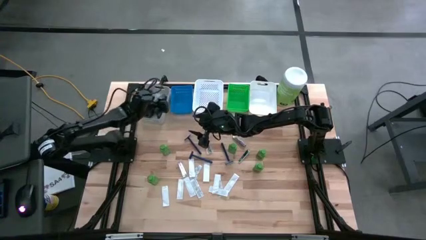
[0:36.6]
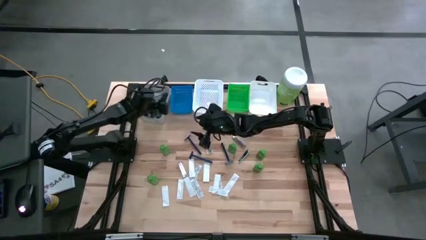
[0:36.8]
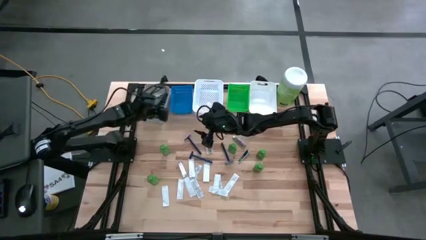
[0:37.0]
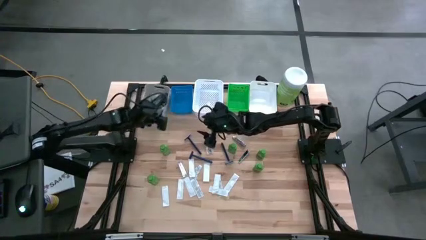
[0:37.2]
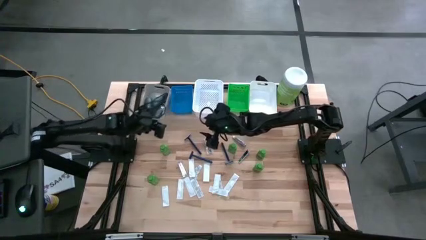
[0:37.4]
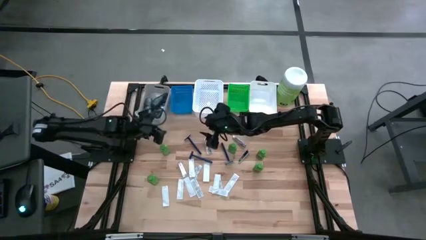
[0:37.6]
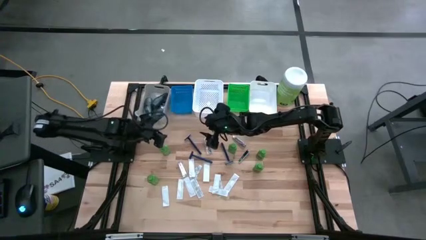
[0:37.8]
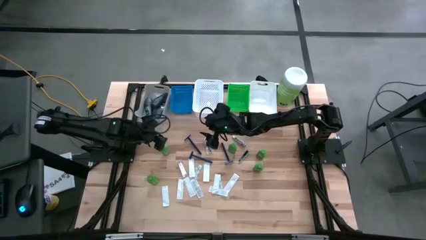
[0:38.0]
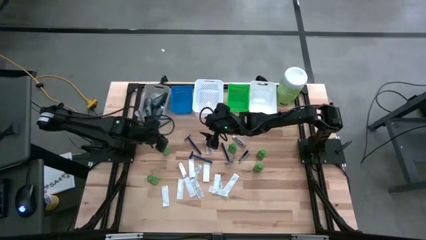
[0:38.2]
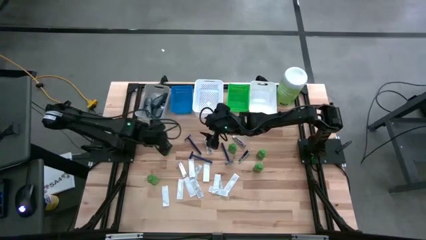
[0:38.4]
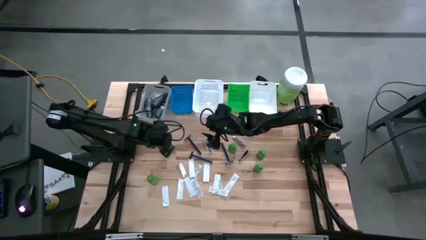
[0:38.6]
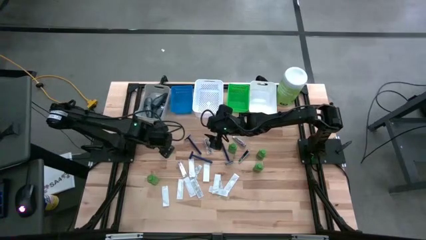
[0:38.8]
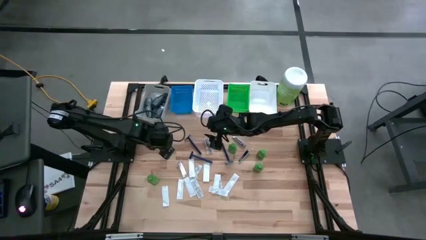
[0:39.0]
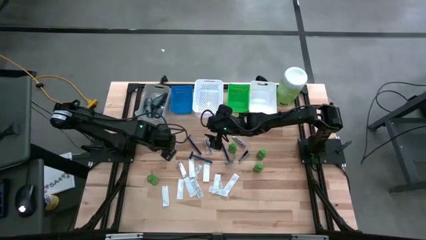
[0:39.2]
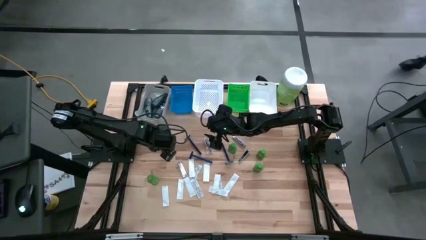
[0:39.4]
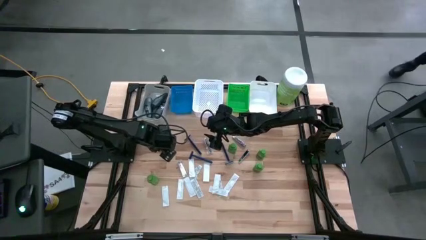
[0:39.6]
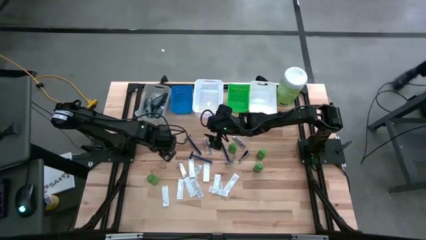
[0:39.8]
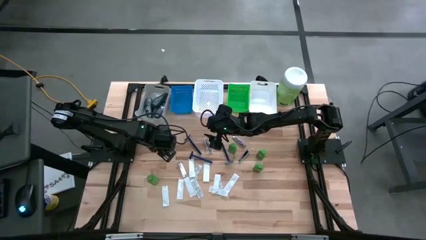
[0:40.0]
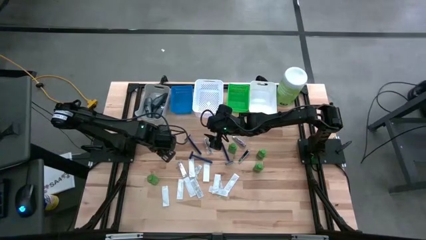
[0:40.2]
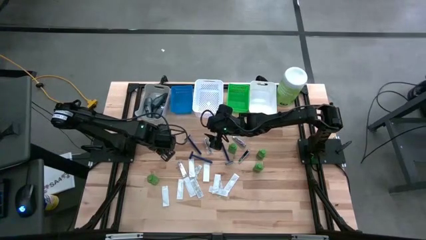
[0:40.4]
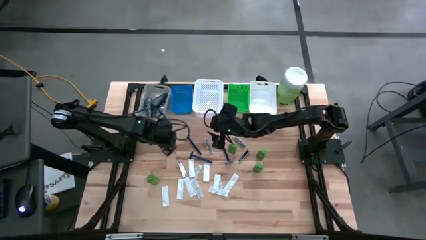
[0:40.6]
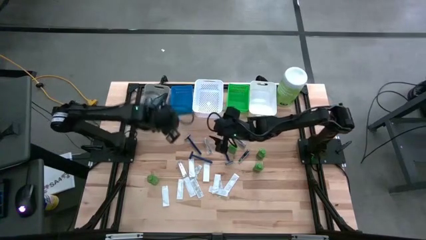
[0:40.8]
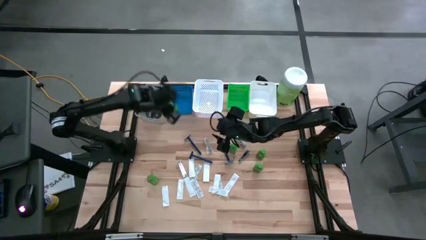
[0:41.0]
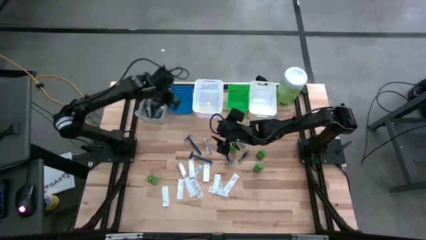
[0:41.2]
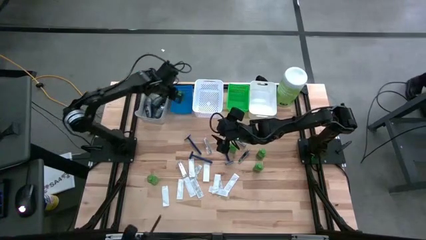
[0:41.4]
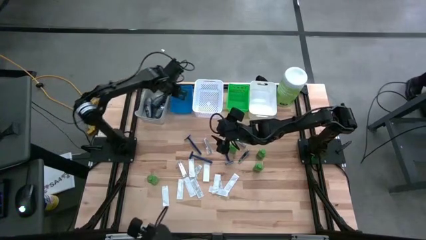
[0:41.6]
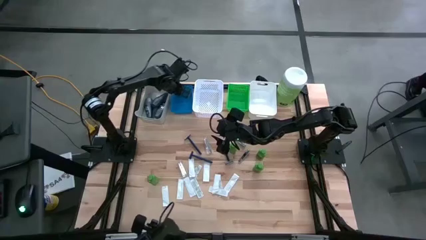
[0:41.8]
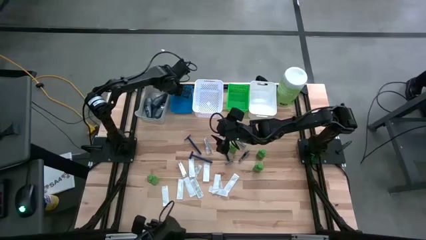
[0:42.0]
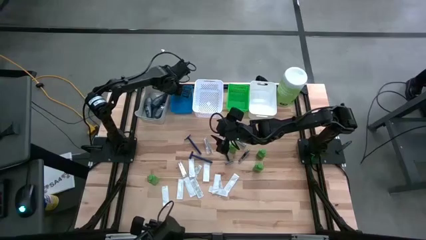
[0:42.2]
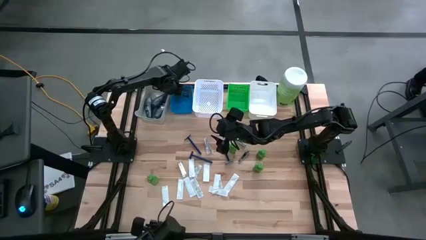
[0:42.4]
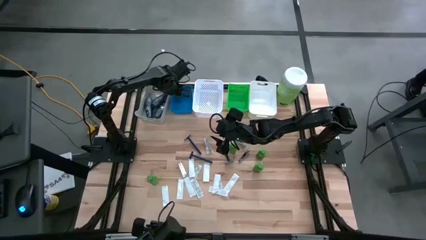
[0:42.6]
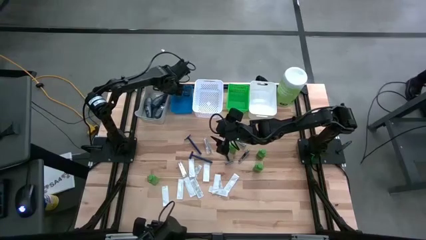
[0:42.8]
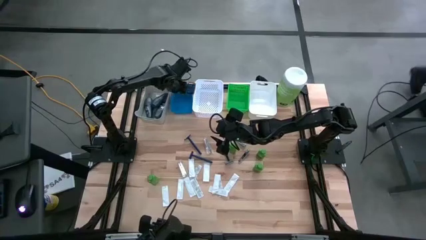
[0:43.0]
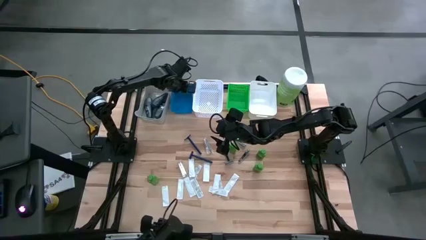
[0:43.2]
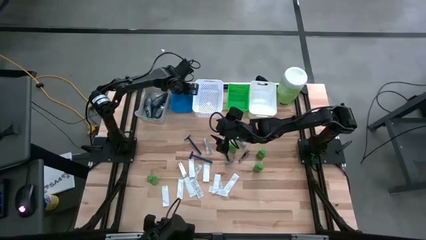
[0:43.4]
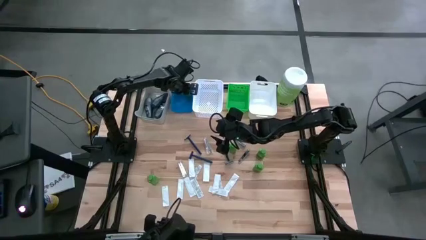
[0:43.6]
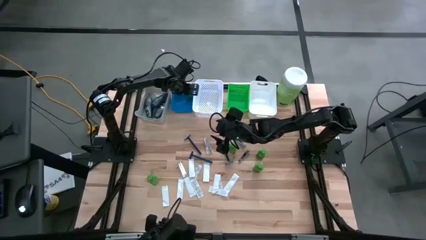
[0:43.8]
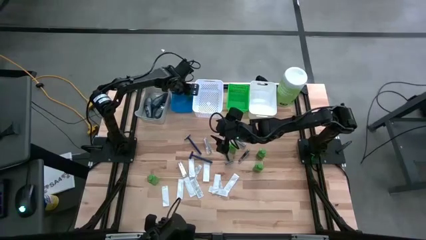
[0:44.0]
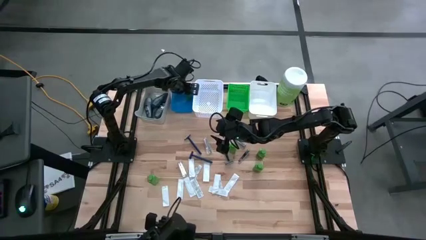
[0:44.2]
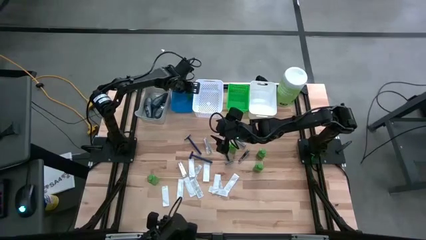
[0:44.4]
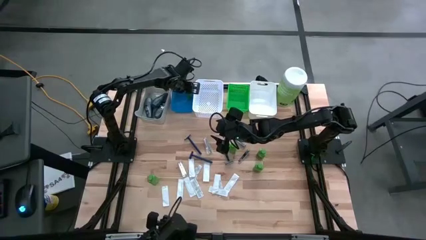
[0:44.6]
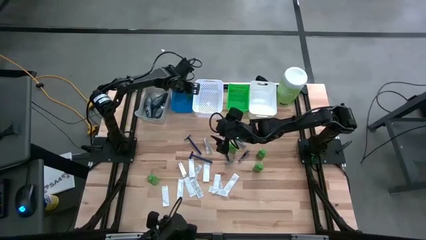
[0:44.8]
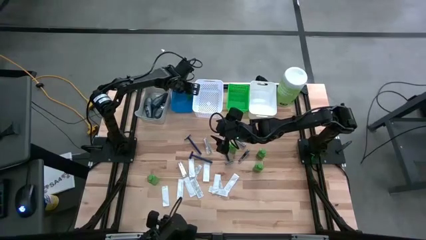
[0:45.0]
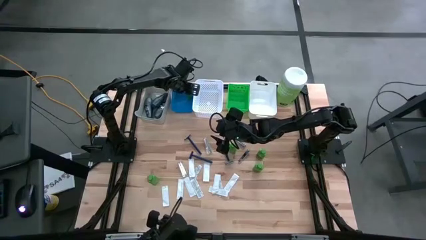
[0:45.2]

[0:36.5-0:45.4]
Task: Pick & Place Travel size toiletries
Put the shampoo into the blue bin

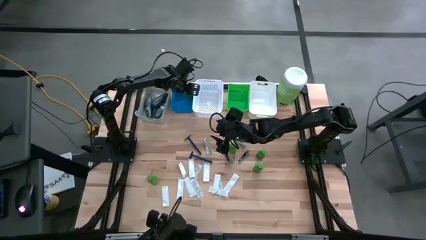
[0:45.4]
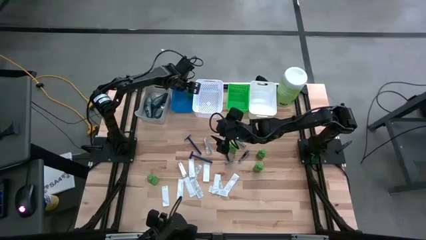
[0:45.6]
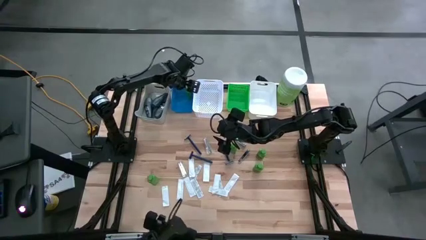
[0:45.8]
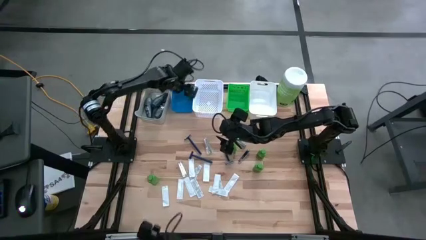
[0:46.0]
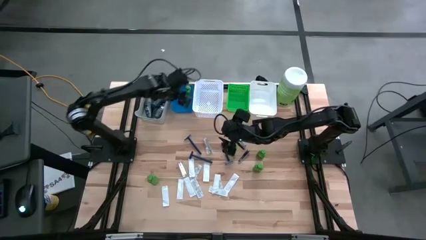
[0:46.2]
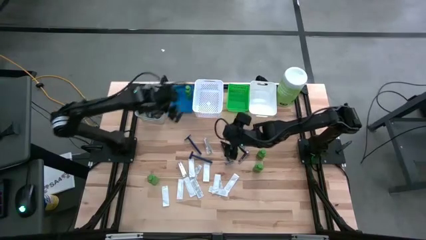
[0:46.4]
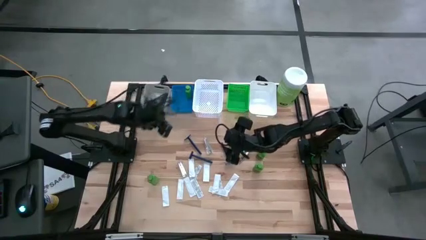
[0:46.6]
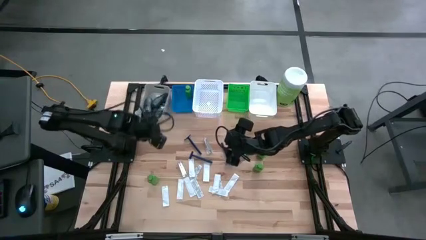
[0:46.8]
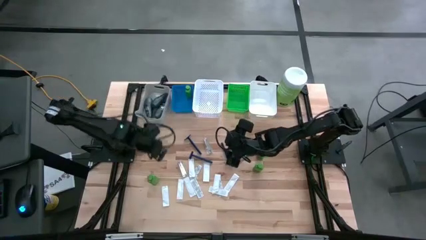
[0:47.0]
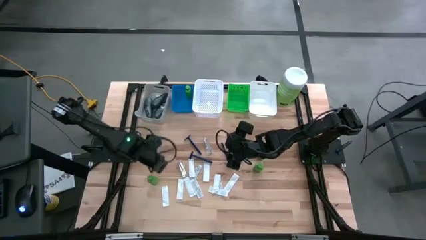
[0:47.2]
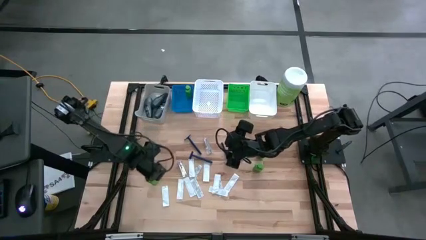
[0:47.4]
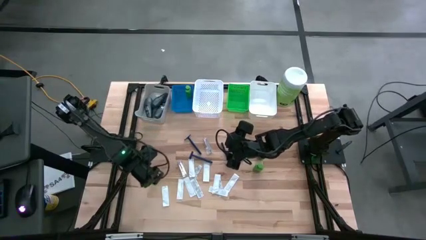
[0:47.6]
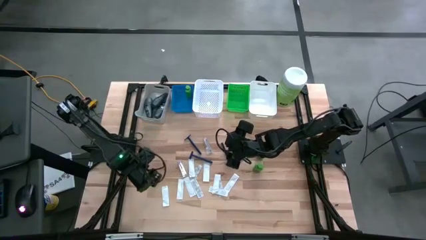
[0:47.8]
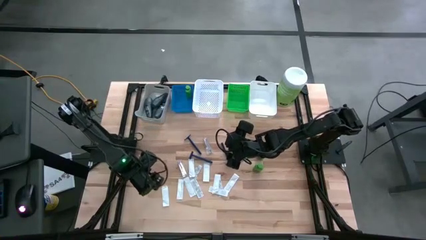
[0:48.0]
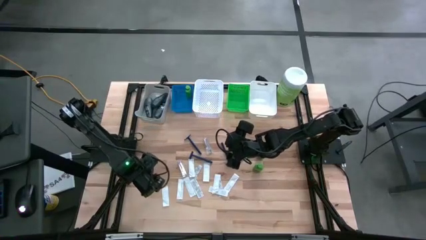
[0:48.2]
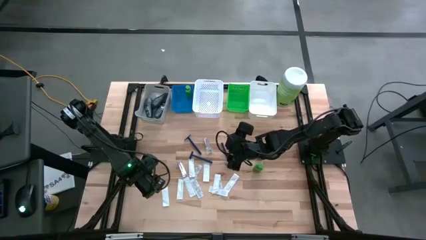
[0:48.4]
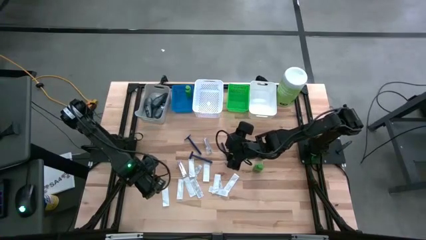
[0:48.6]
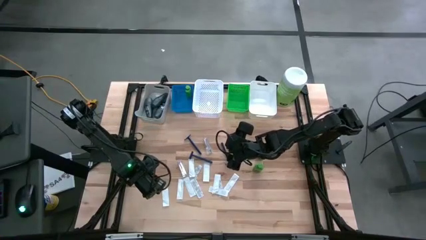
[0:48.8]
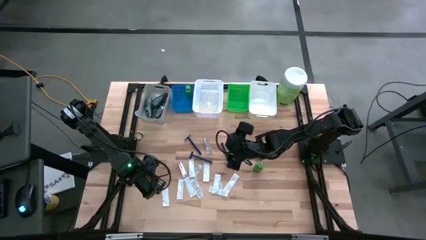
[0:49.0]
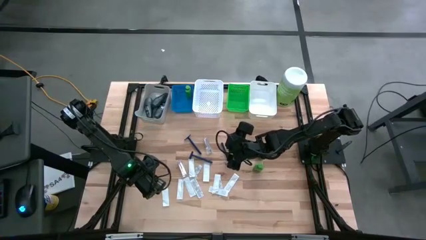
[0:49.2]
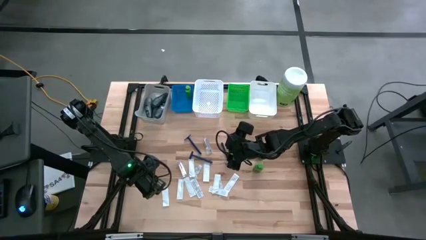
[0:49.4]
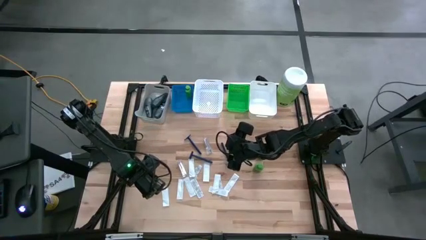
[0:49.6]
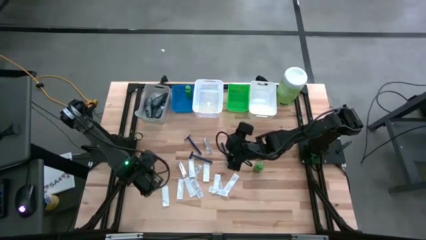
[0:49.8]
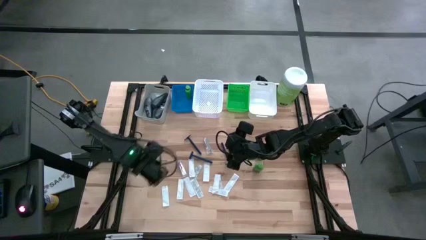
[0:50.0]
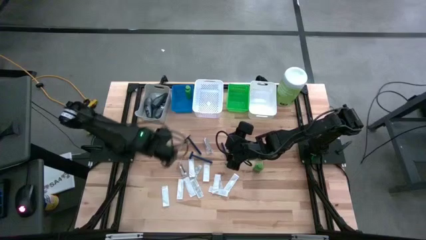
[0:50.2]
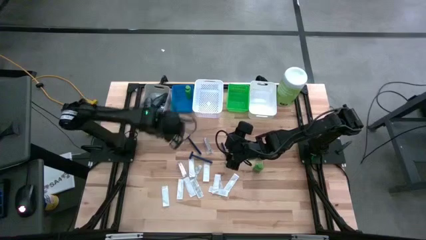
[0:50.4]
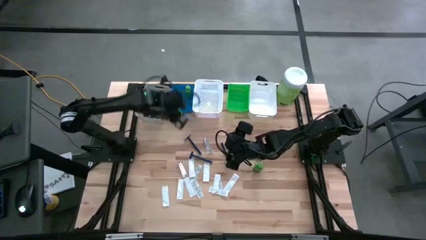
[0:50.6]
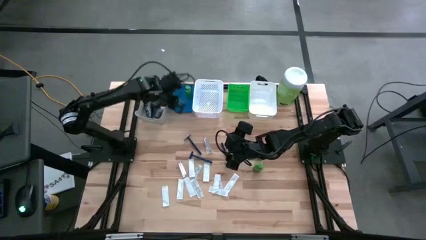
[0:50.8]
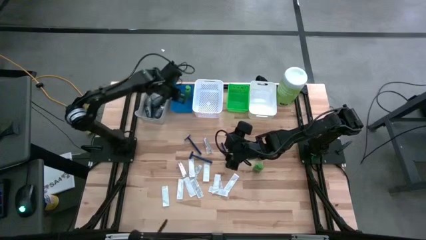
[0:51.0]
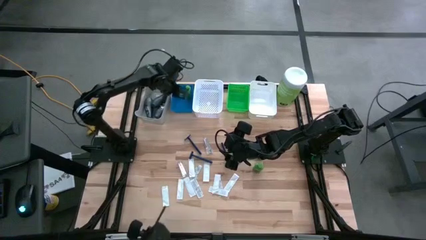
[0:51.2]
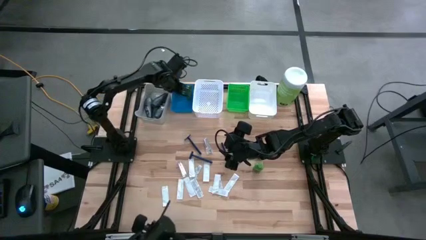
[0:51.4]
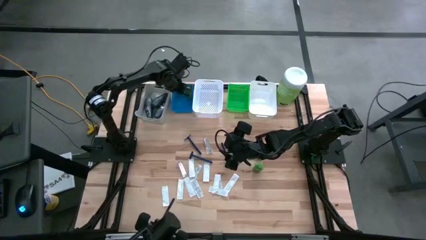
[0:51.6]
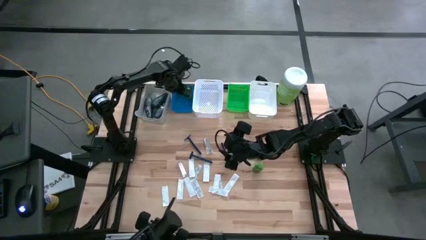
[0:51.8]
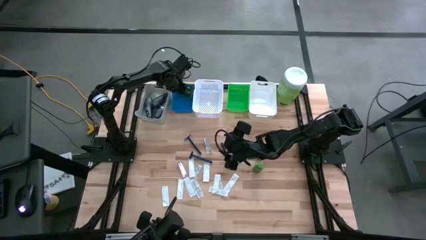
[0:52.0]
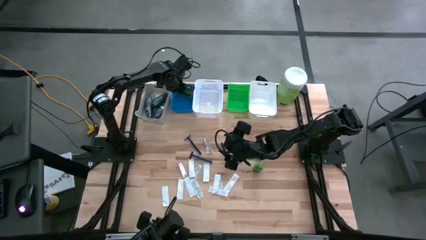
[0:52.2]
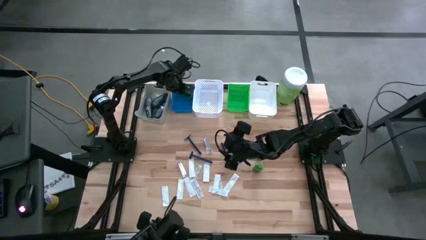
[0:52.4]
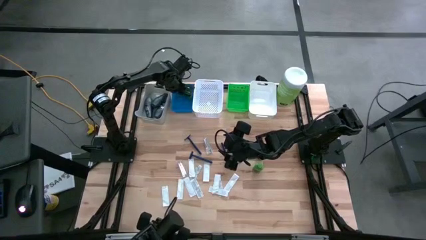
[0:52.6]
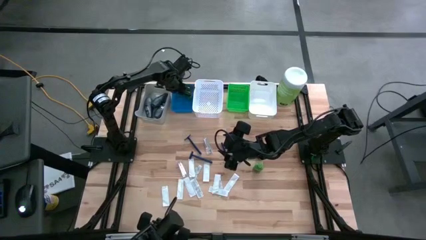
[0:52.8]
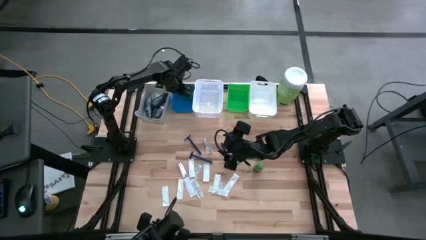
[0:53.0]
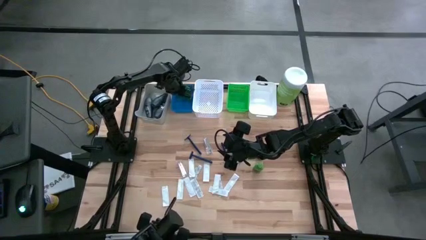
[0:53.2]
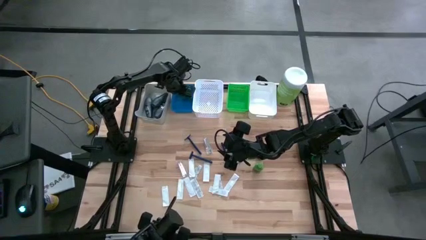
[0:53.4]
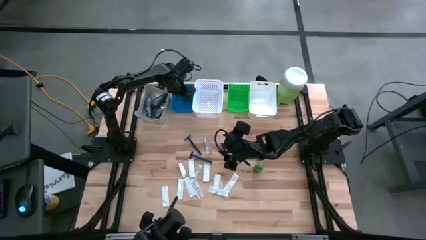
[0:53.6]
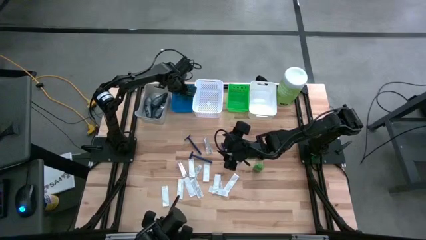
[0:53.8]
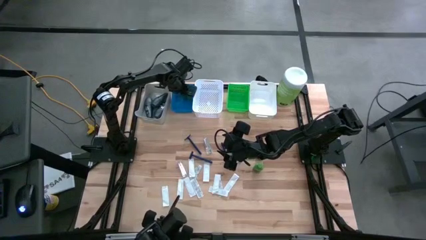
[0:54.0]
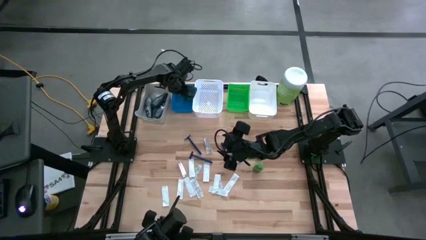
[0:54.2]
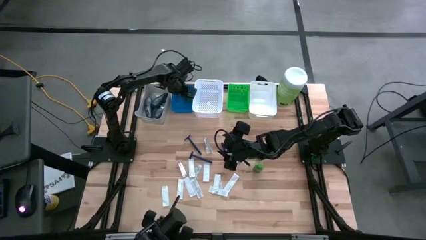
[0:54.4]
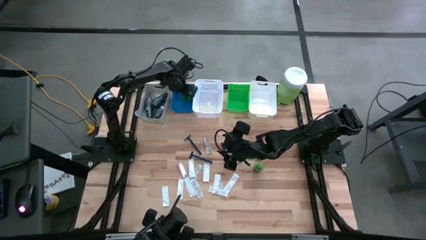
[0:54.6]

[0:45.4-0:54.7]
Put the shampoo into the blue bin
